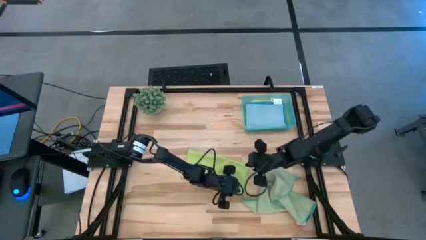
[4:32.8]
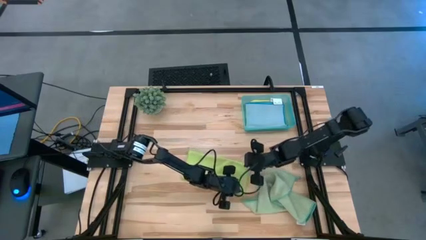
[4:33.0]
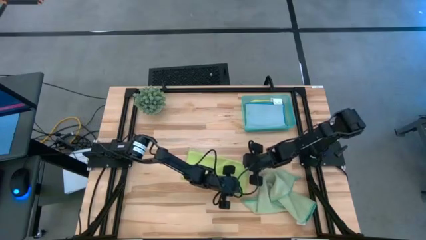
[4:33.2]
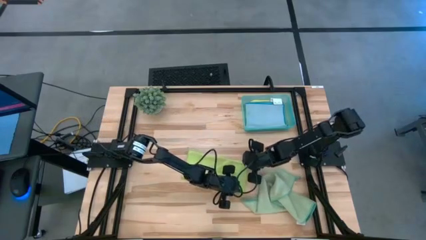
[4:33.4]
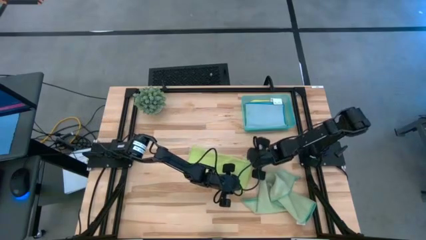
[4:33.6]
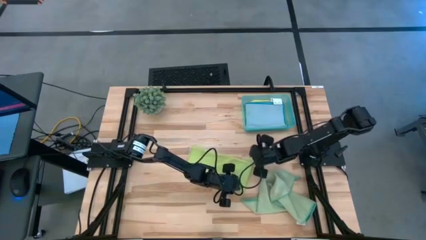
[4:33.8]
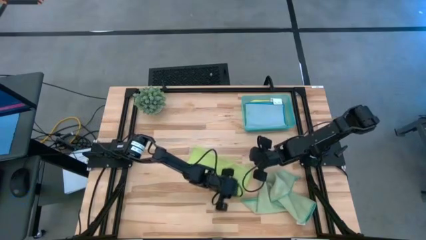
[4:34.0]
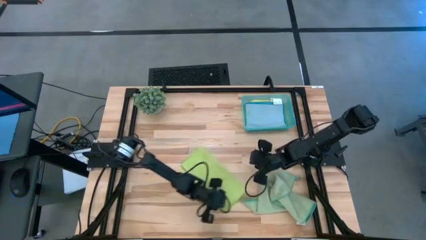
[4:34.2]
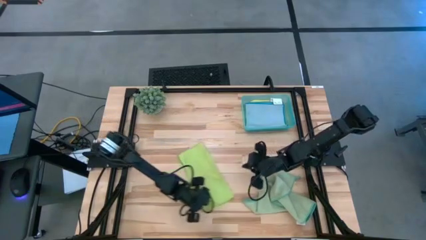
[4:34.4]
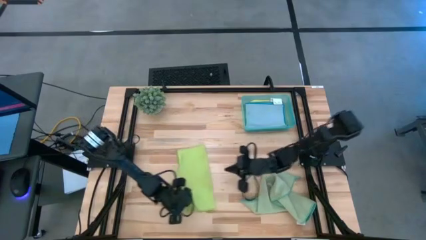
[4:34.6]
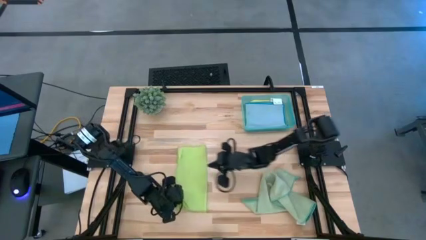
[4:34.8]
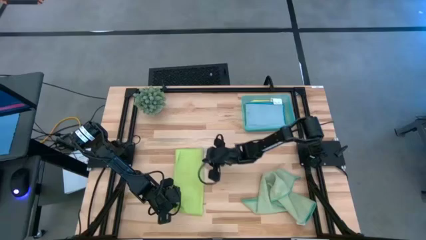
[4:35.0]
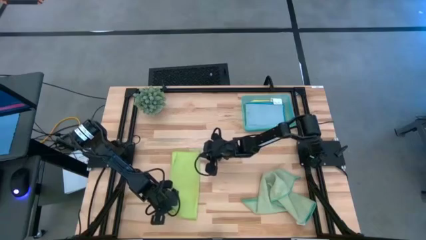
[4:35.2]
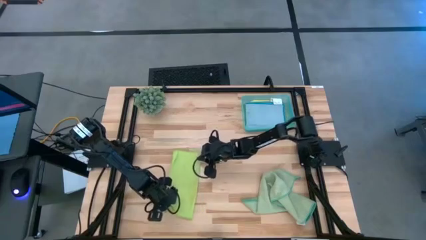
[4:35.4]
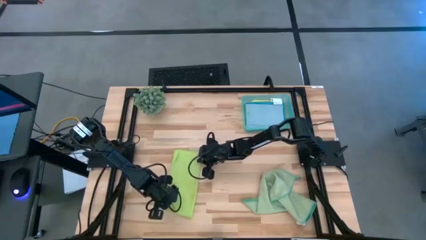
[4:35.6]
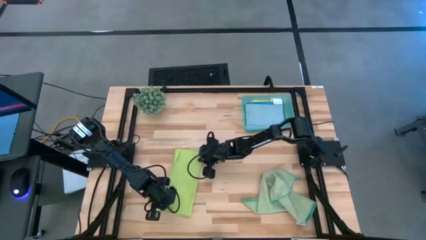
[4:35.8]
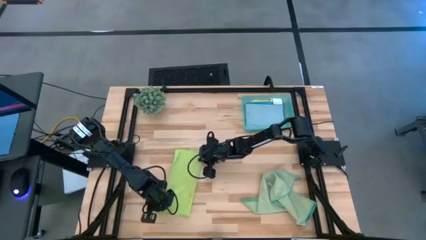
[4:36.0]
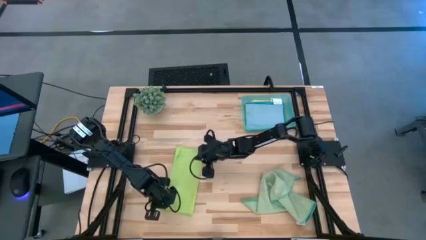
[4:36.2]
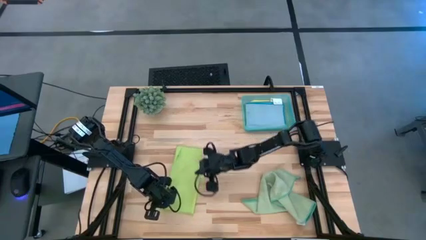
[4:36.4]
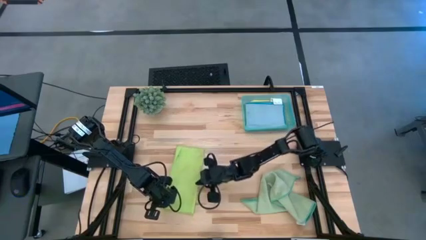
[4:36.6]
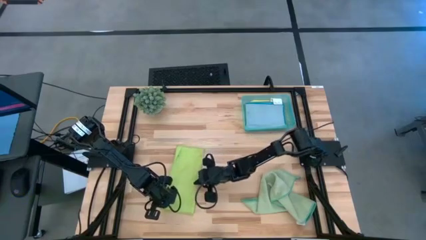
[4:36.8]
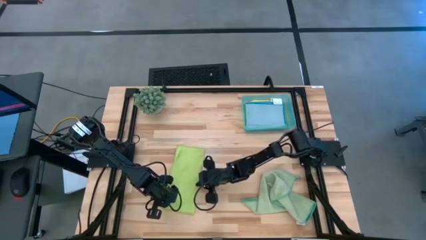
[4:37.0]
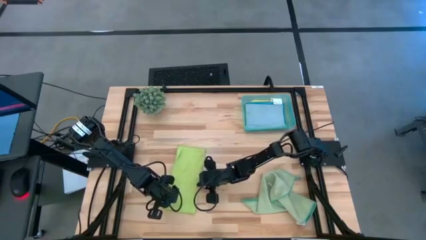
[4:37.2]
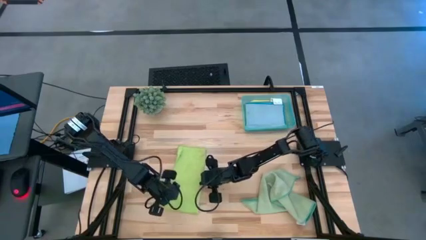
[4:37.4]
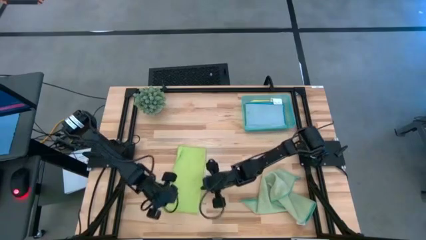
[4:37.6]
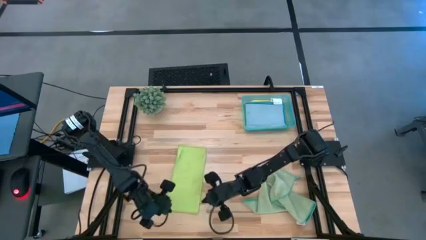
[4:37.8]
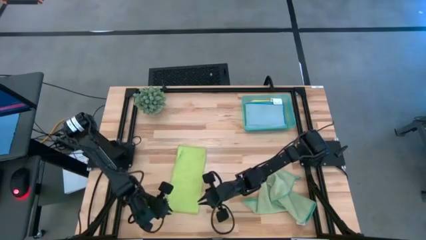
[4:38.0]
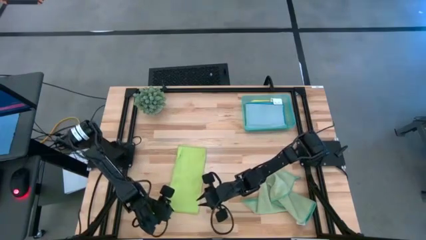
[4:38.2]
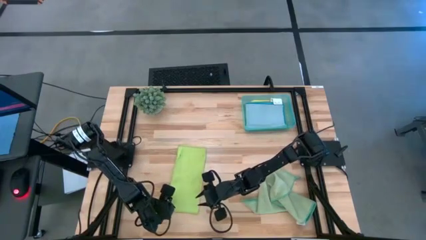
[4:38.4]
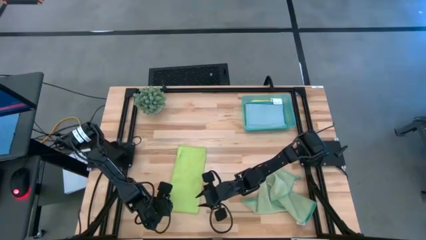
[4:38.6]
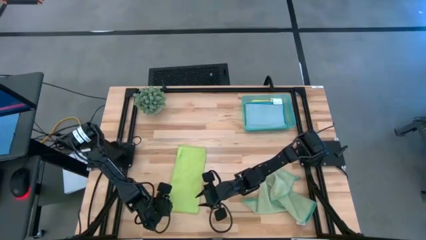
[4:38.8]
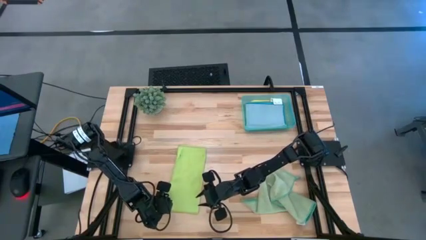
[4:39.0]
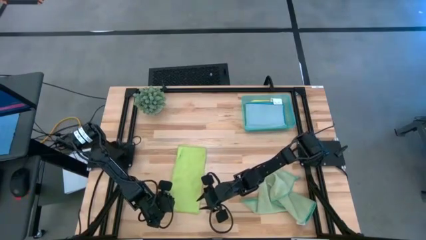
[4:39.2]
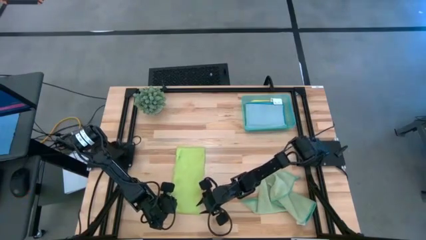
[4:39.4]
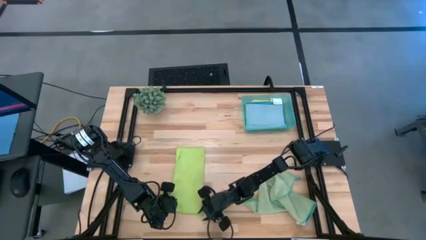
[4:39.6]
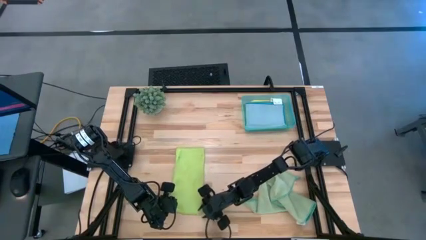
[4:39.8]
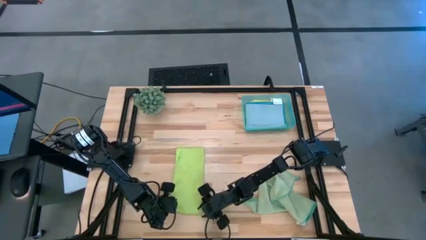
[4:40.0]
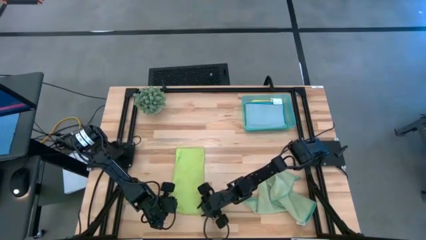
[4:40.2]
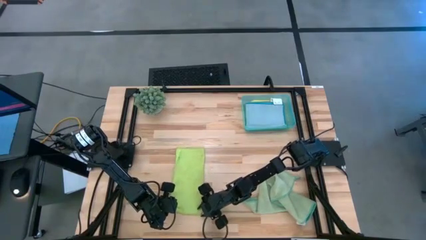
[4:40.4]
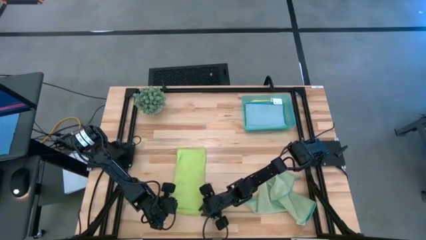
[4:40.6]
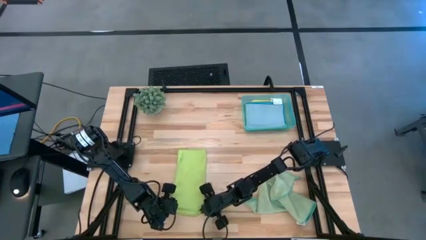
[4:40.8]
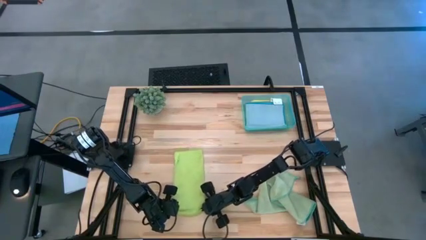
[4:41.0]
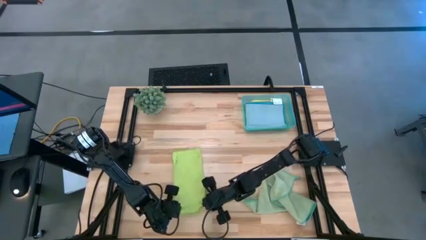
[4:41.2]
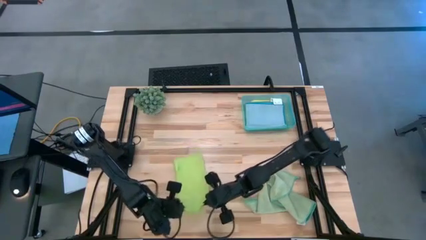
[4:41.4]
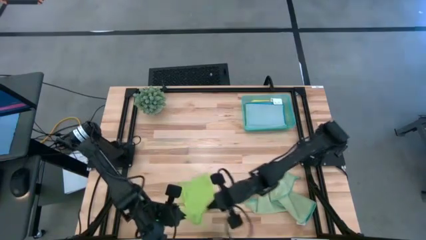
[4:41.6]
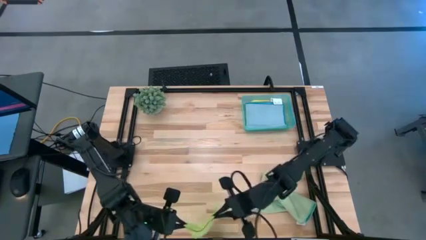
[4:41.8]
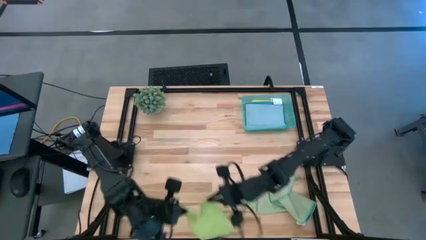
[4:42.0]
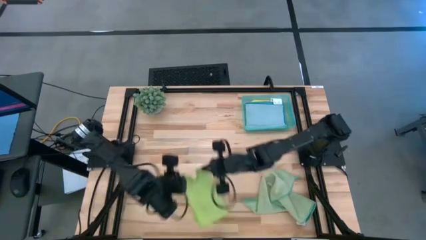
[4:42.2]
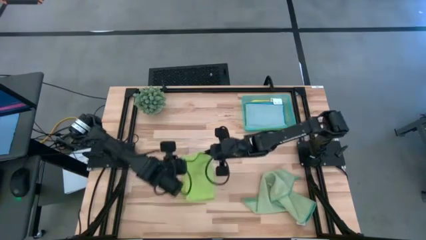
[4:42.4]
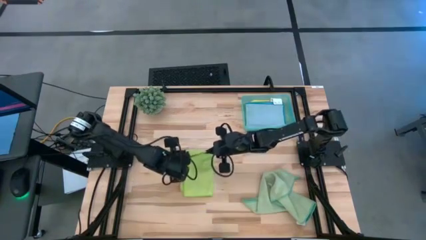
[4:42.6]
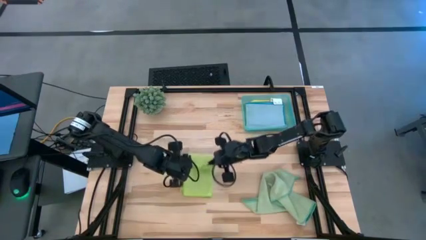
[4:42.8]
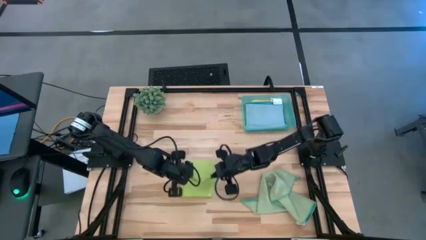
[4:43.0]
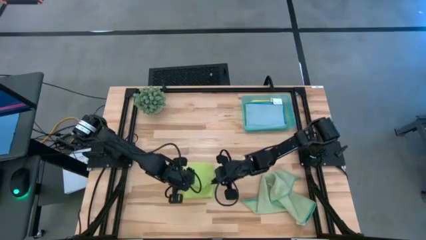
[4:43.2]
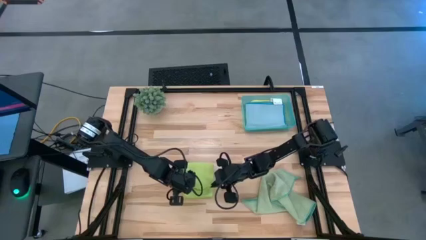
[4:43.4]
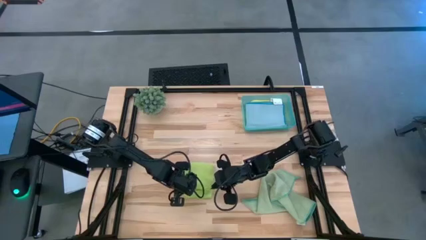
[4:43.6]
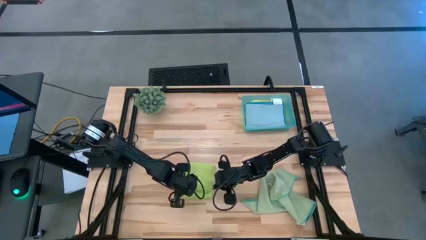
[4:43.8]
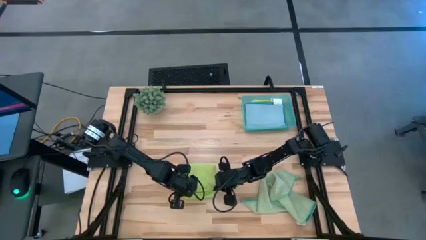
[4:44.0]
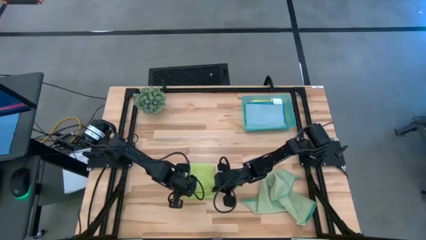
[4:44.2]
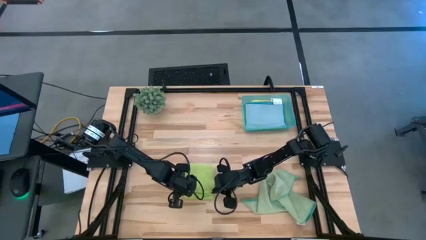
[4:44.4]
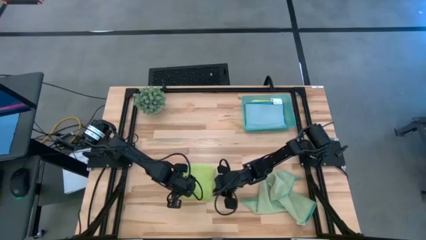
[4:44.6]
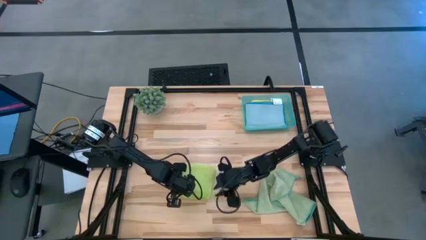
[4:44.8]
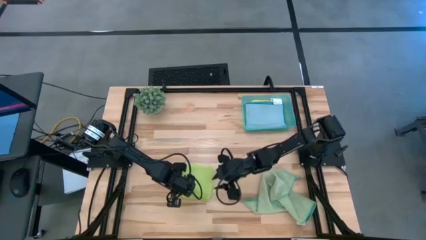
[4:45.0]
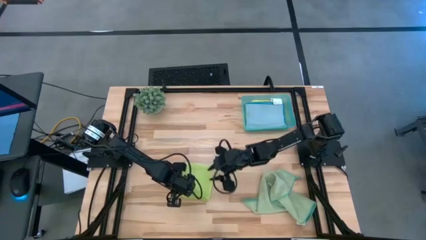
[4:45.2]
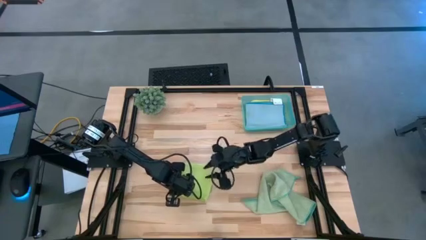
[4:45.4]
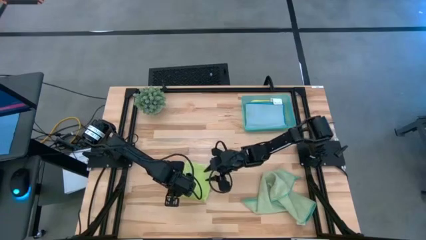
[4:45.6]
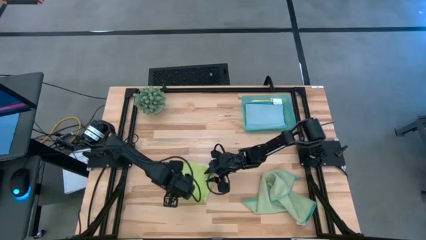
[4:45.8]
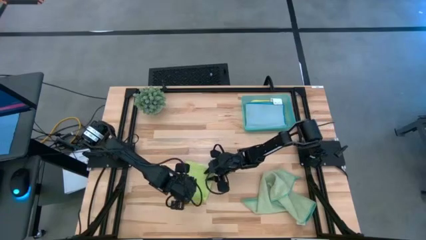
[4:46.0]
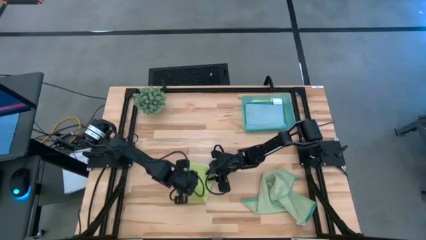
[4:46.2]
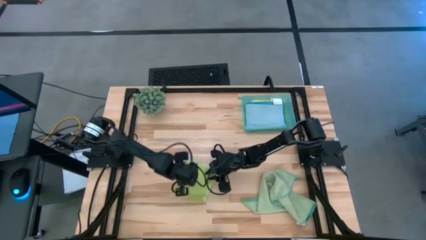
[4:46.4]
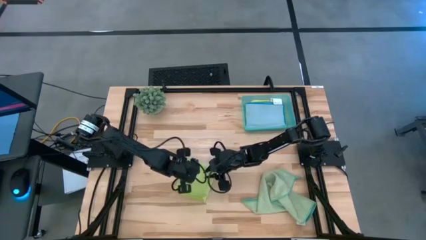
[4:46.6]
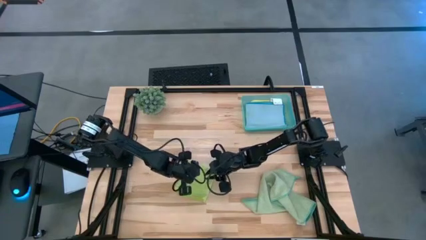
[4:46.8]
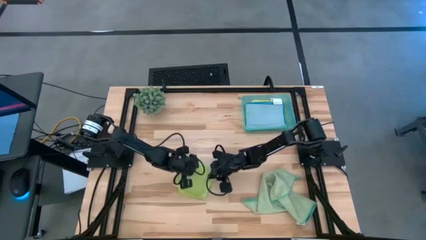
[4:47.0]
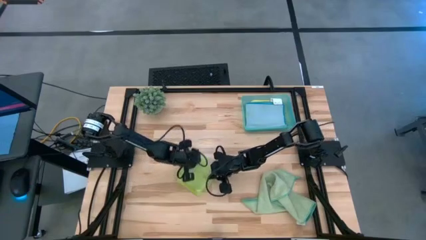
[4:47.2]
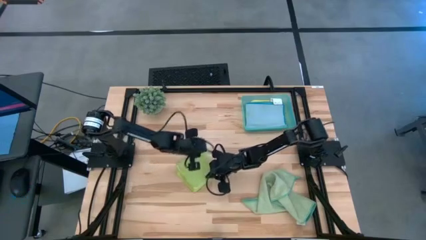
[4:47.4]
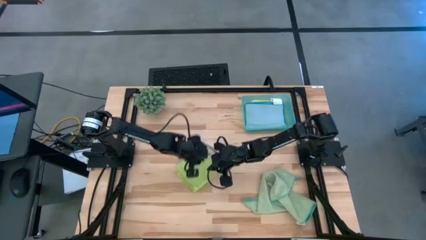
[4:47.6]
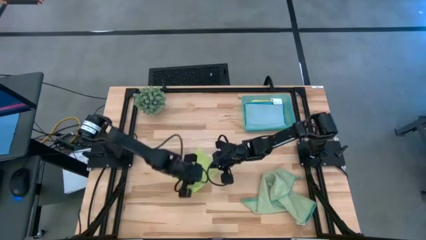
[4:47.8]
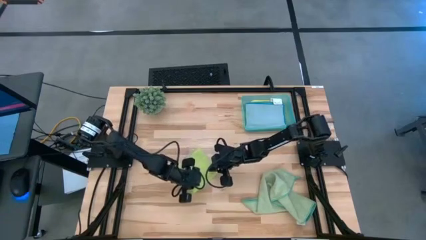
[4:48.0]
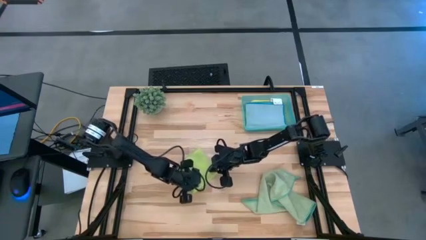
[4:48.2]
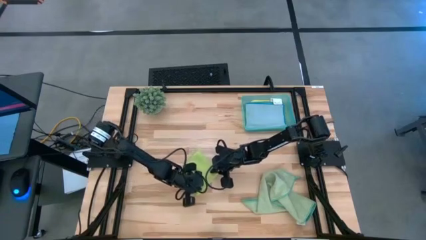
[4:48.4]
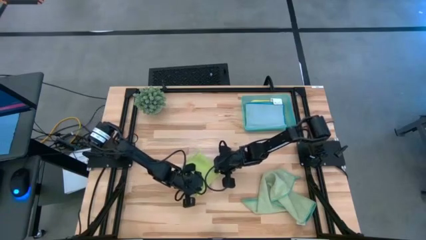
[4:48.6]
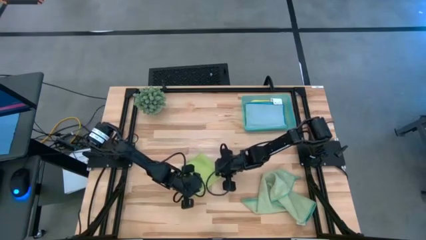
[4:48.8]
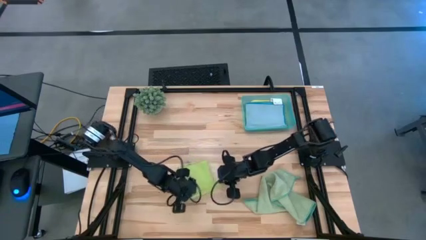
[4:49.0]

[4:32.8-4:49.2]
Task: Fold microfiber towels
Fold the green microfiber cloth
